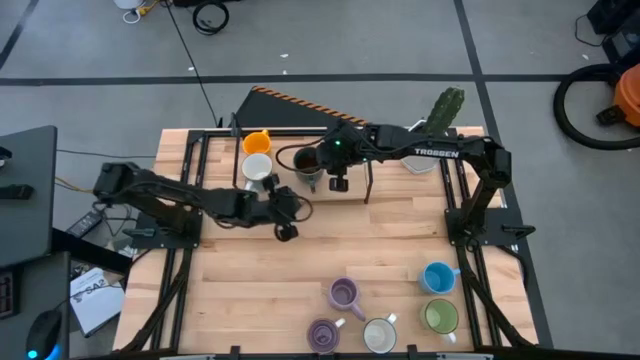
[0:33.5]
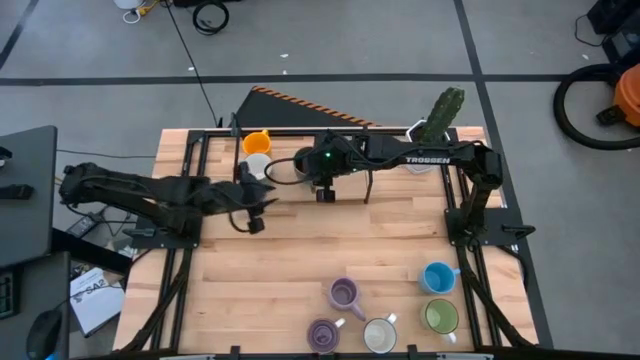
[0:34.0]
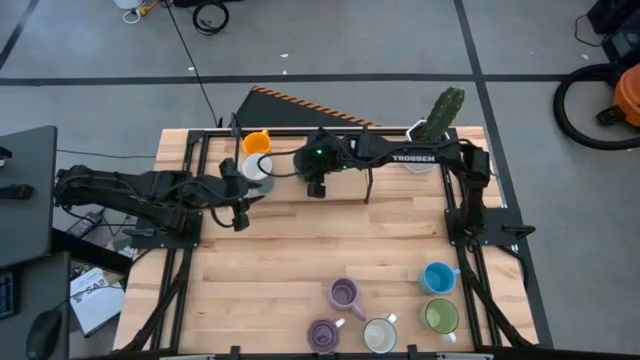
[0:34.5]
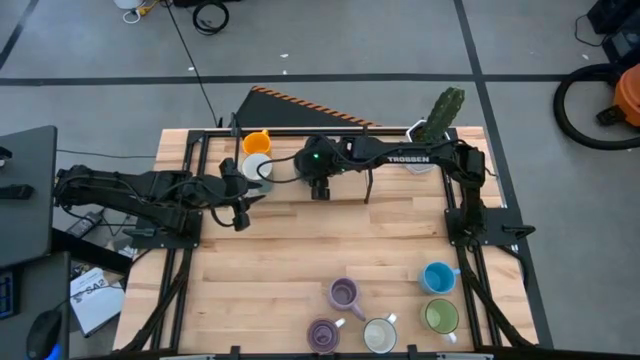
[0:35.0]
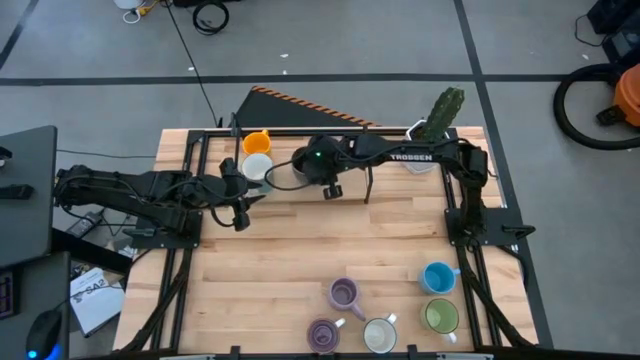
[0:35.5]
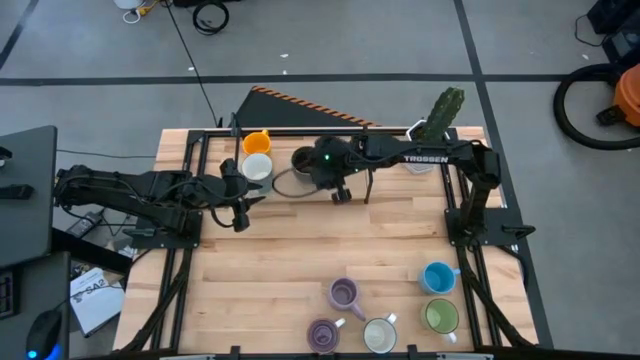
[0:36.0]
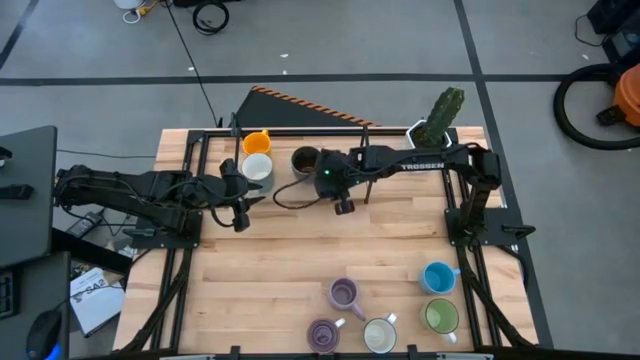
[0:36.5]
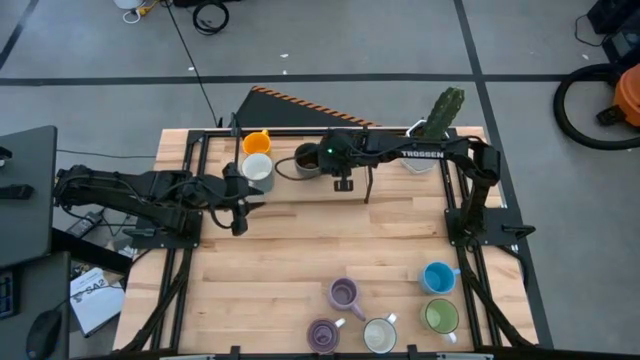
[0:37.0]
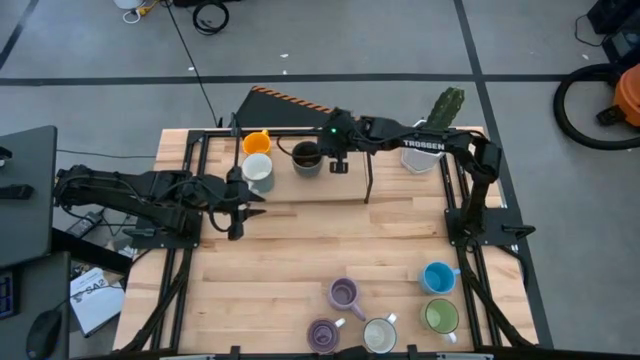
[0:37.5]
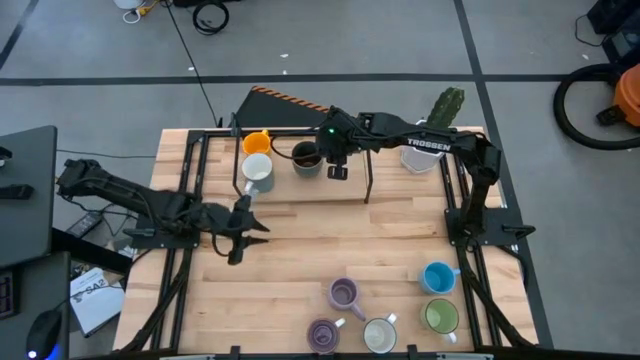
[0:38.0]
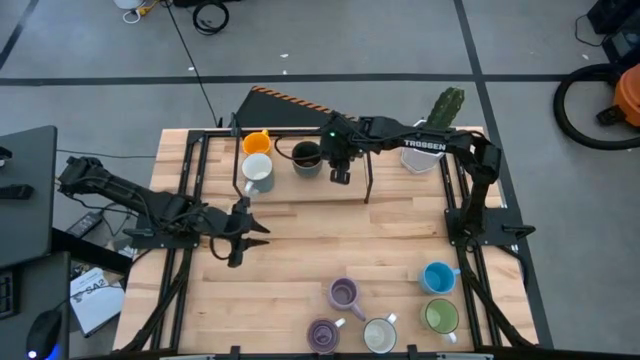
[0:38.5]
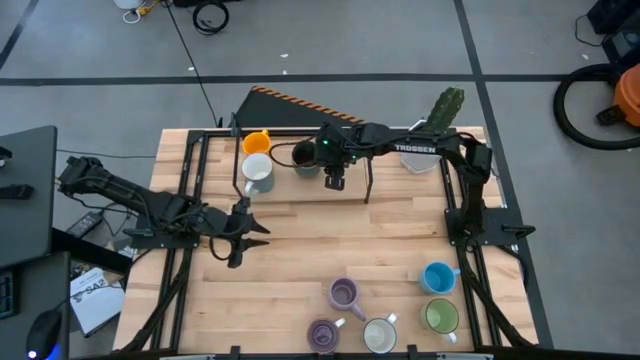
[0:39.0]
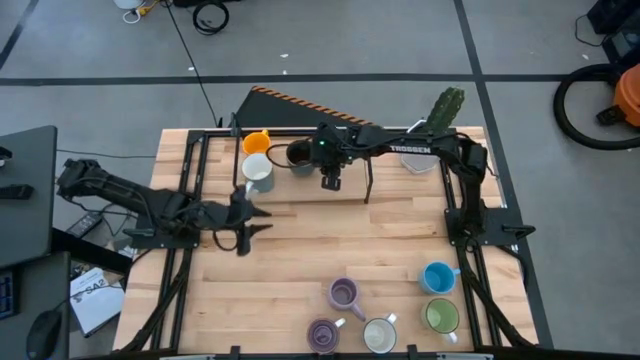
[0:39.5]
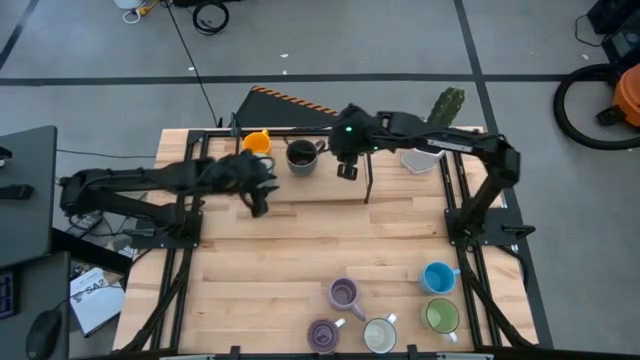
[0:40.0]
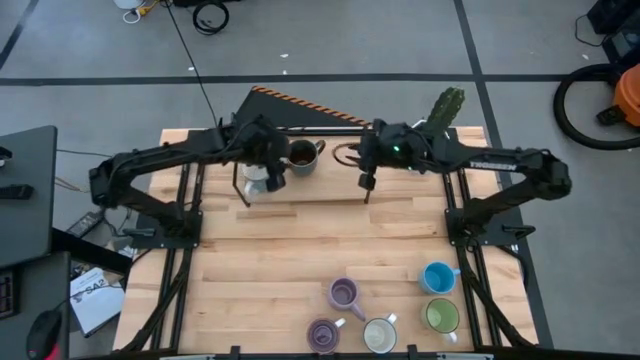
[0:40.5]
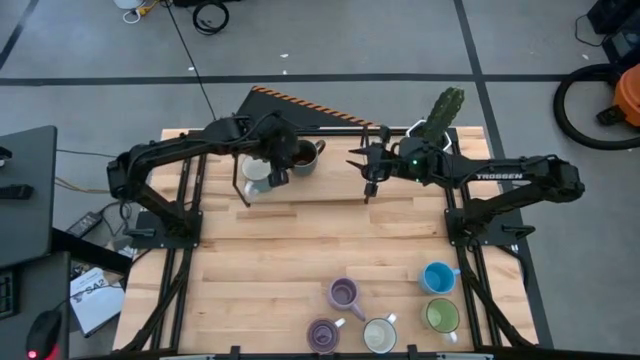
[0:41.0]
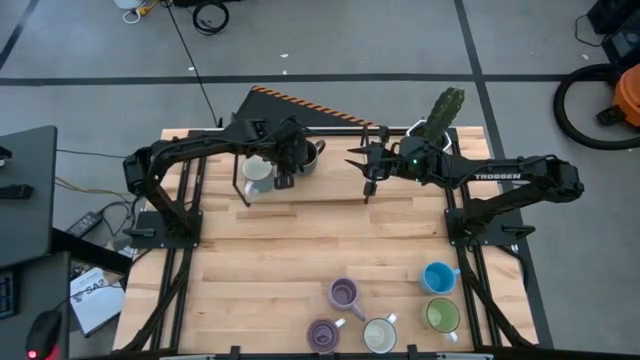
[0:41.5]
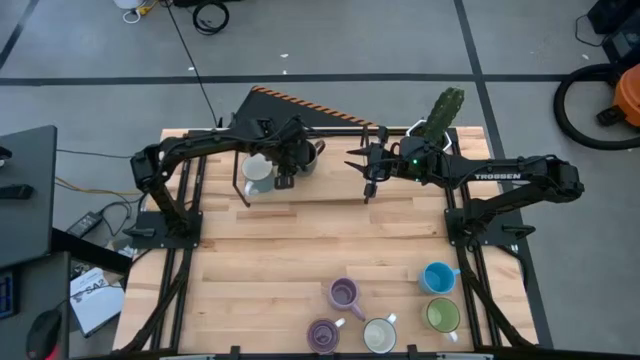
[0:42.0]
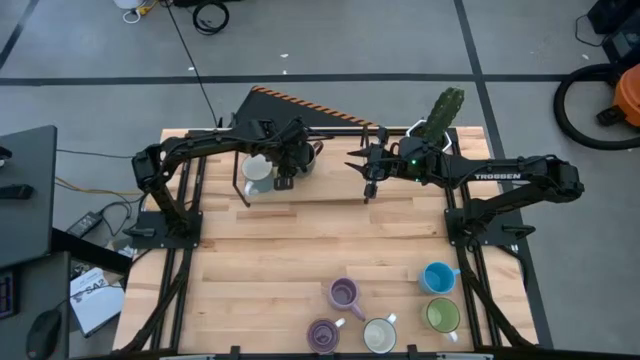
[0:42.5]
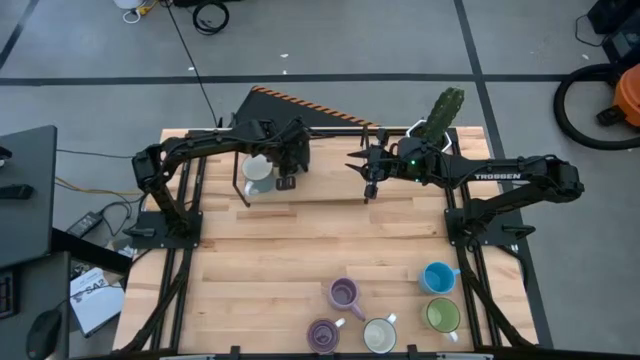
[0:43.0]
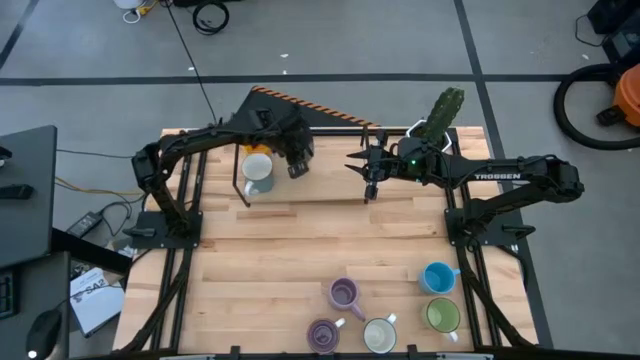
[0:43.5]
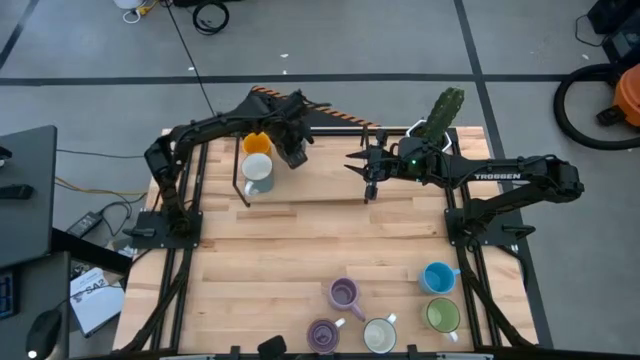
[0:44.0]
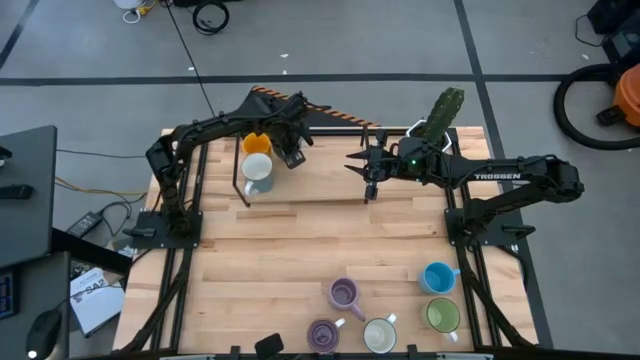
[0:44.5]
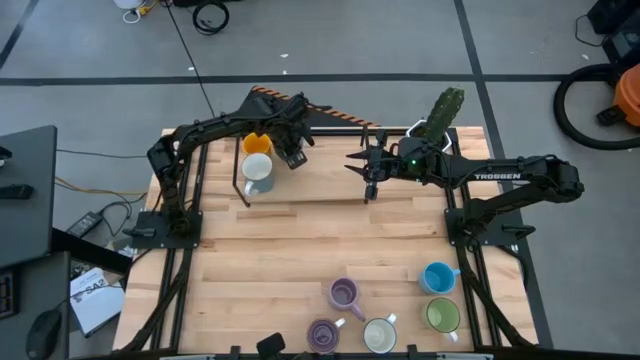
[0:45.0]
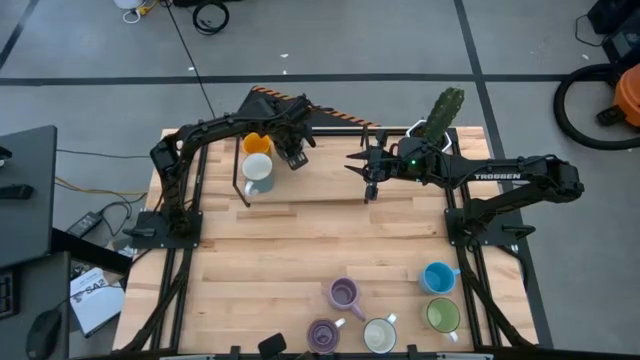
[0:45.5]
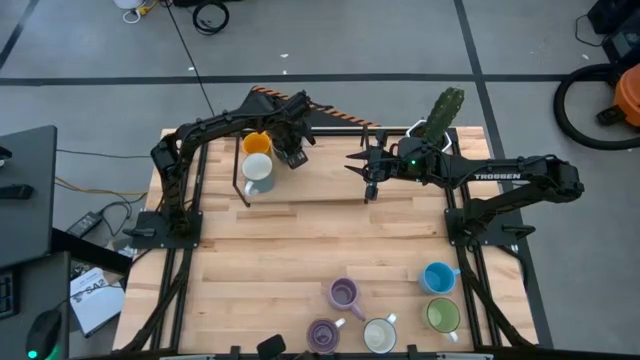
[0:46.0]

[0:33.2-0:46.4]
Task: Place coffee mugs
Put the light blue patterned mug on the shelf

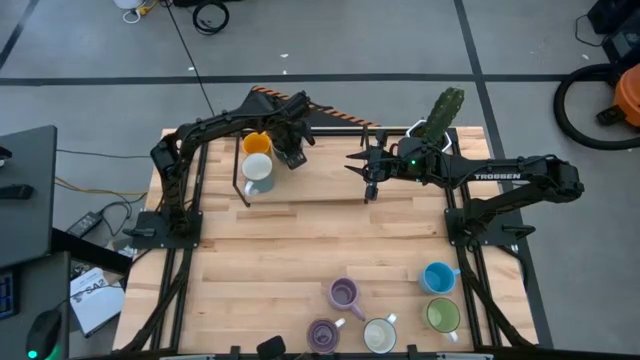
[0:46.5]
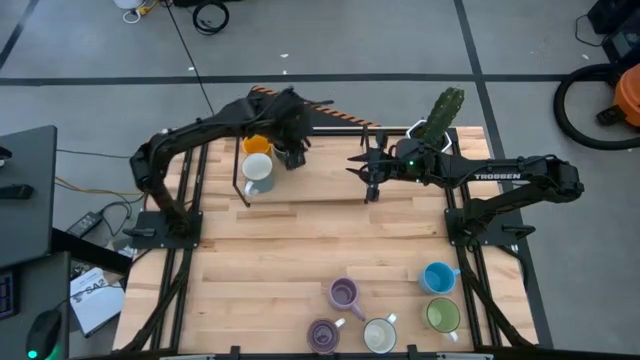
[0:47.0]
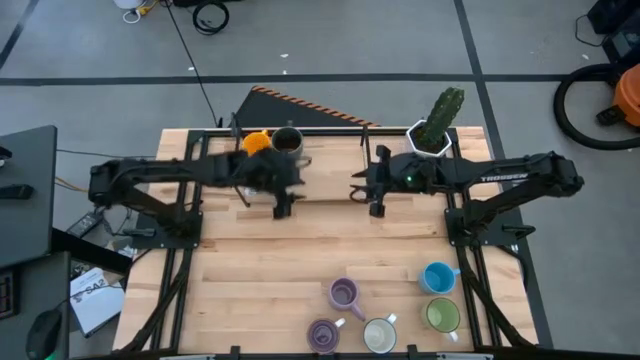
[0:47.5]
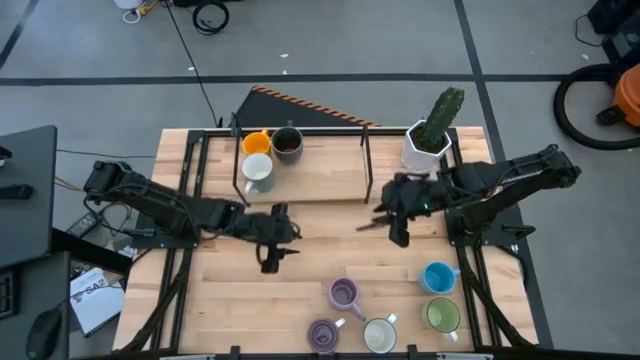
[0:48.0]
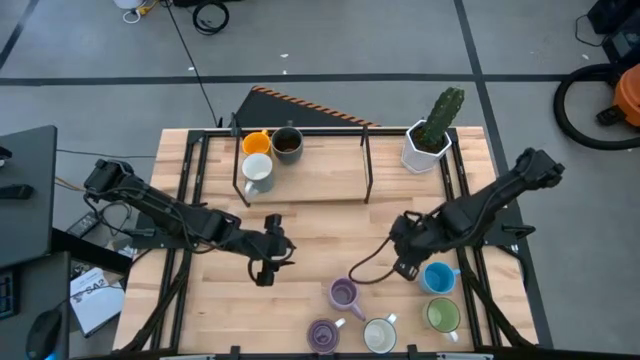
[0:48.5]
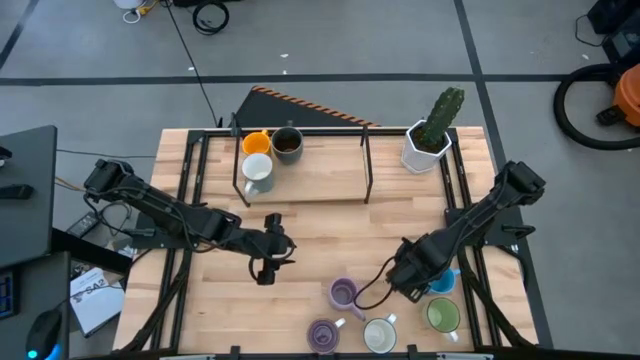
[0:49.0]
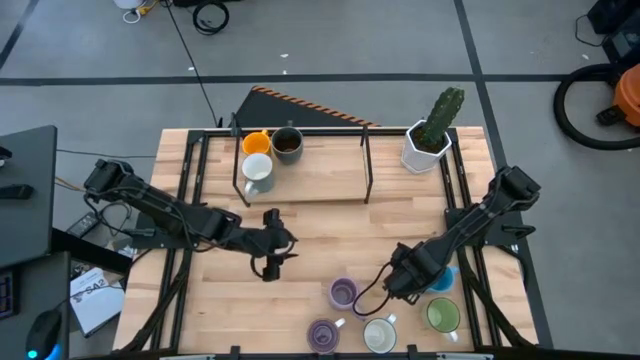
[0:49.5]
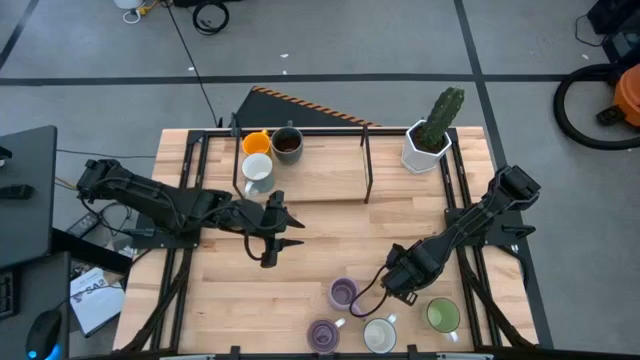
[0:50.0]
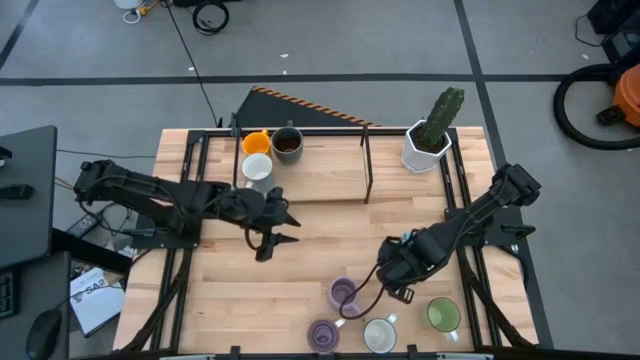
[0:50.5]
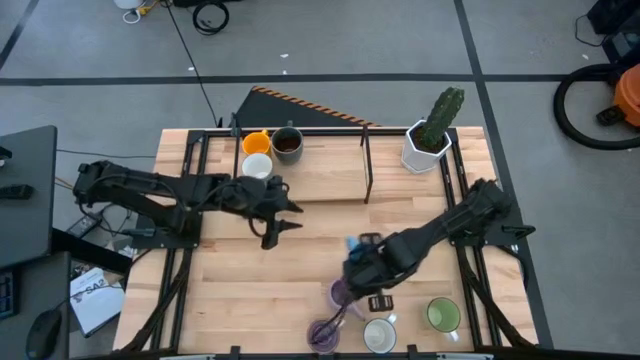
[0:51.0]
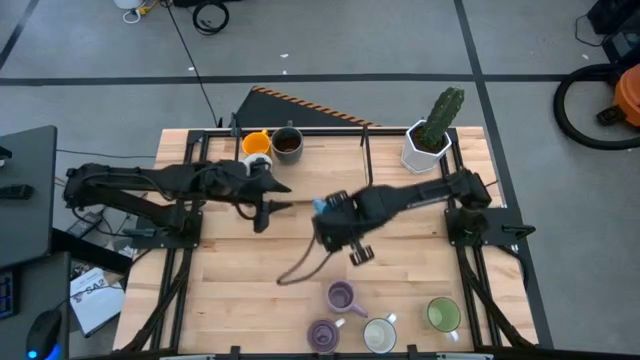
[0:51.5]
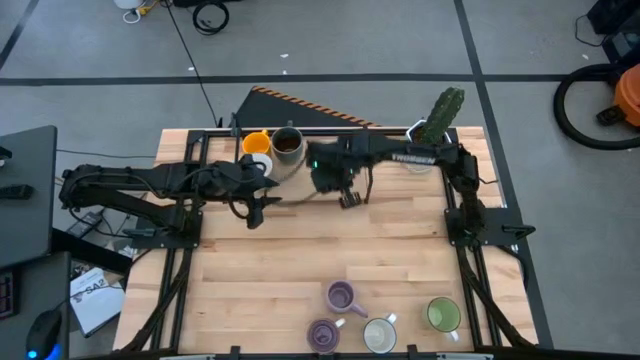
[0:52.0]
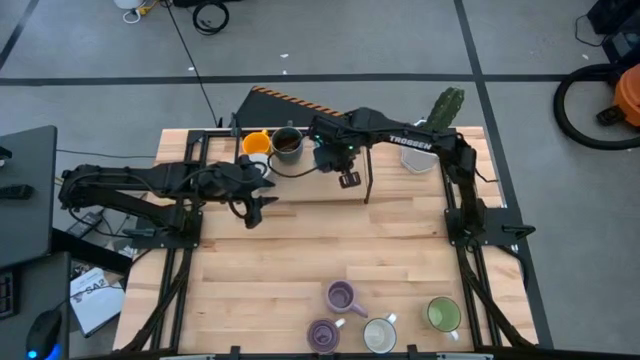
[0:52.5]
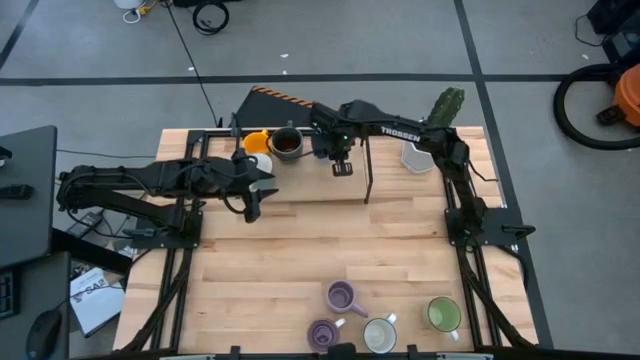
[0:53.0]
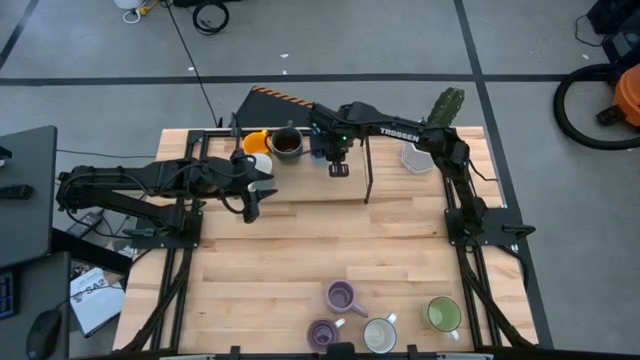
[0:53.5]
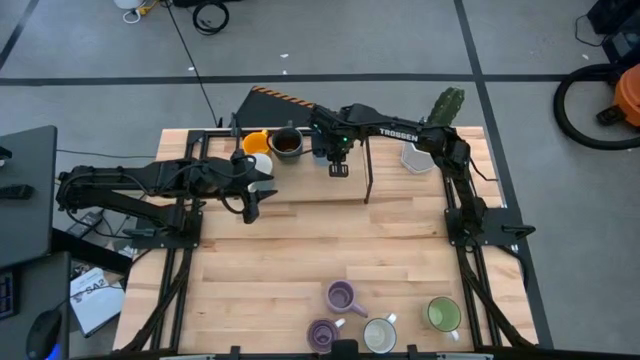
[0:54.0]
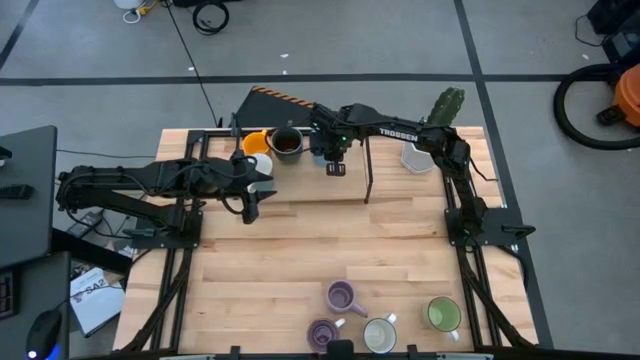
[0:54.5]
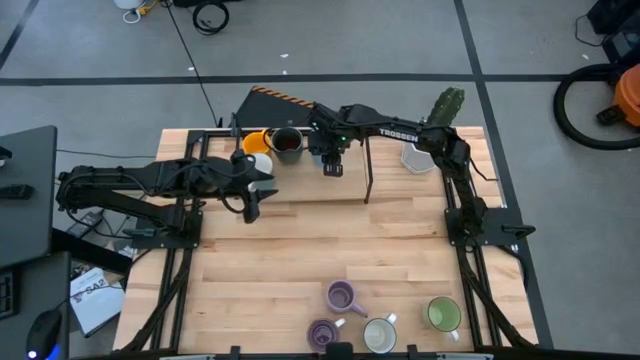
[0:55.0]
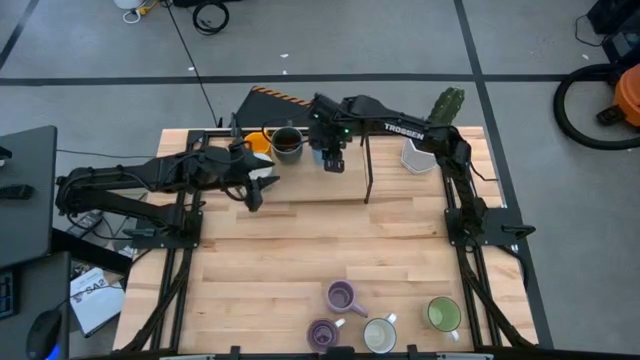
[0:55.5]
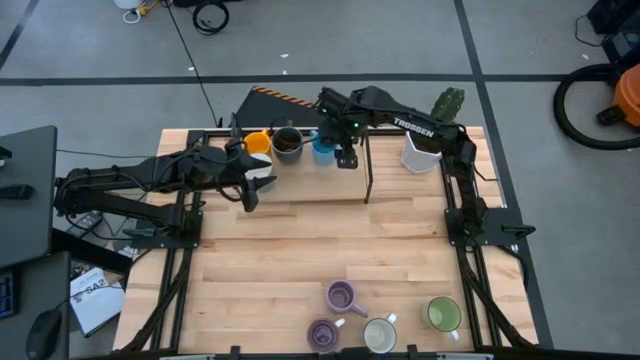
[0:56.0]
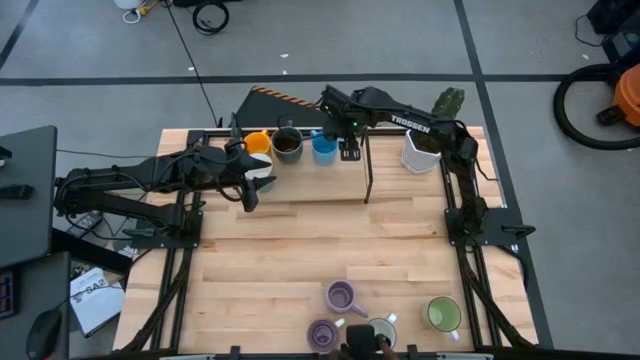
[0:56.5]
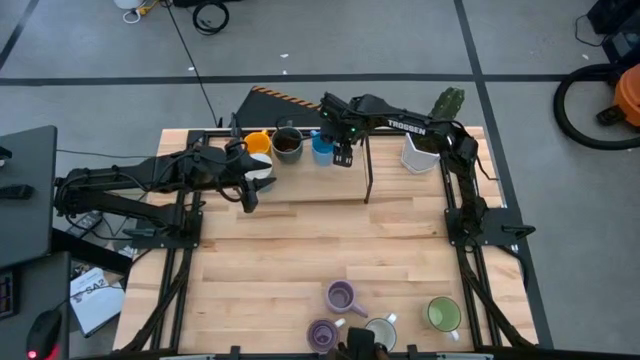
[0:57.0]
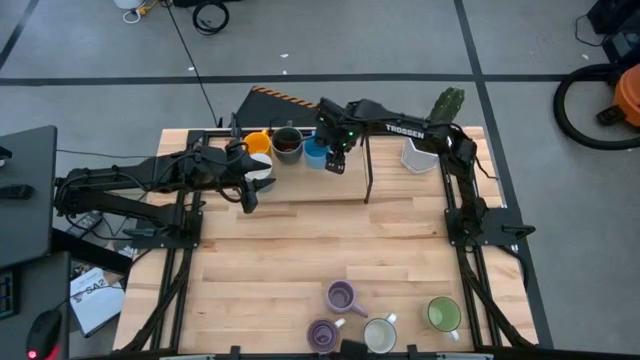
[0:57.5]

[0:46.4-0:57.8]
Put the blue mug on the shelf
